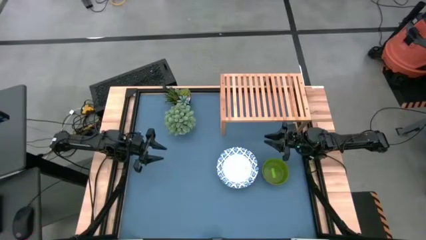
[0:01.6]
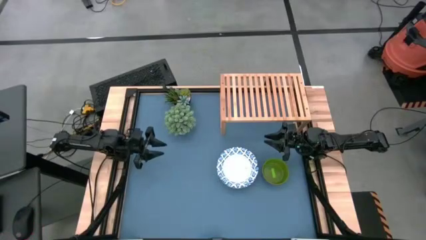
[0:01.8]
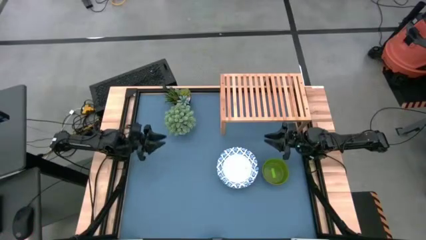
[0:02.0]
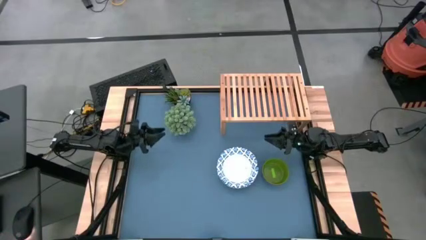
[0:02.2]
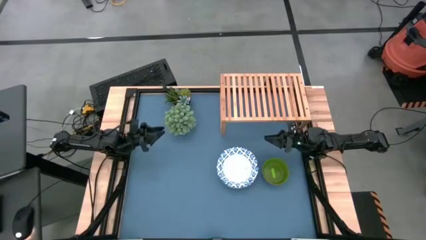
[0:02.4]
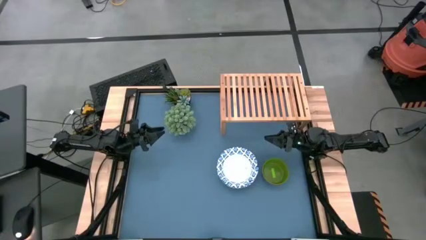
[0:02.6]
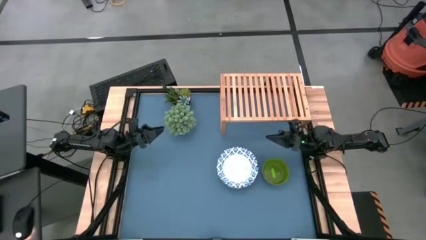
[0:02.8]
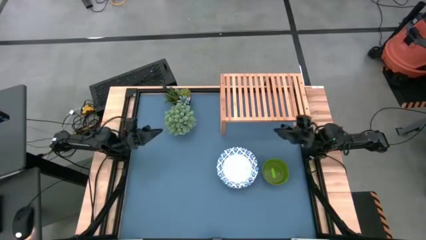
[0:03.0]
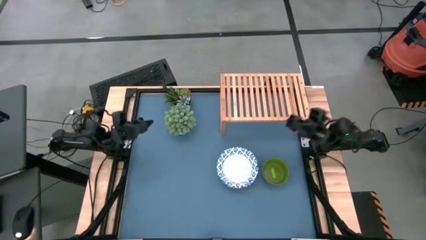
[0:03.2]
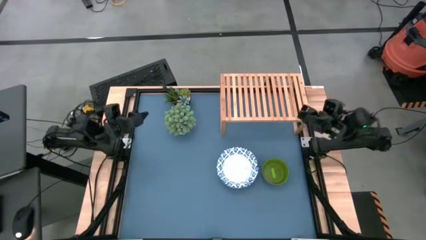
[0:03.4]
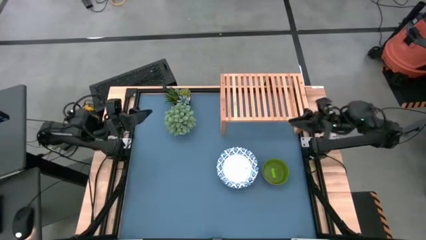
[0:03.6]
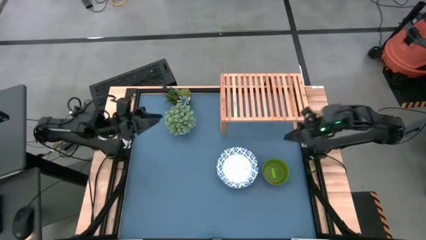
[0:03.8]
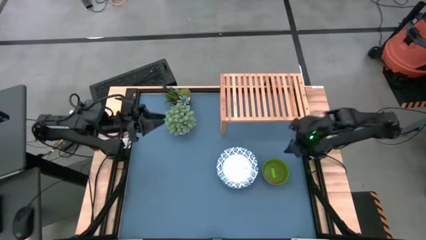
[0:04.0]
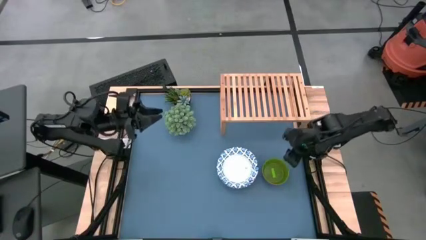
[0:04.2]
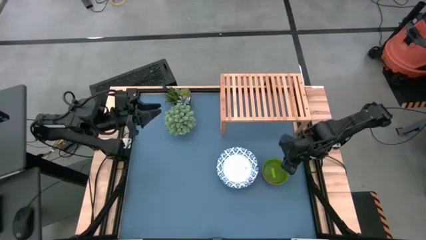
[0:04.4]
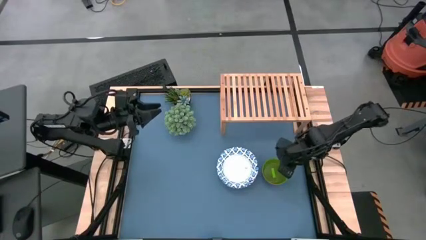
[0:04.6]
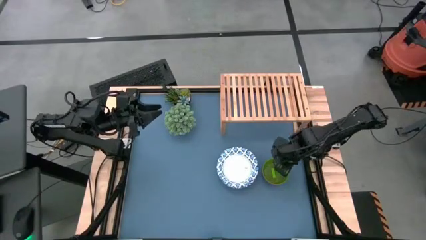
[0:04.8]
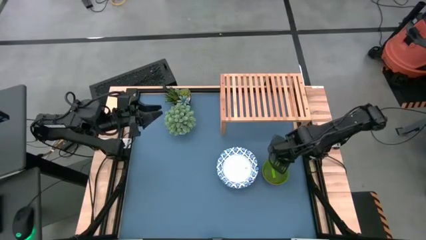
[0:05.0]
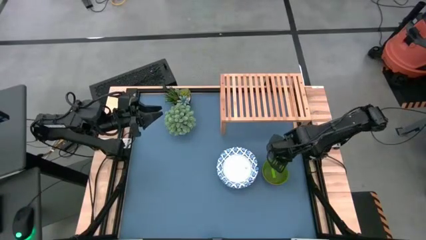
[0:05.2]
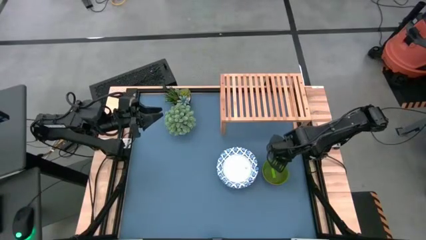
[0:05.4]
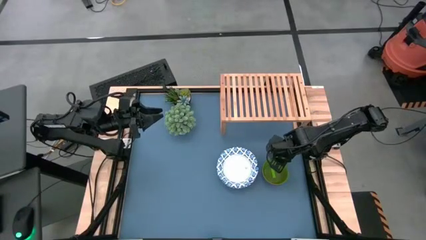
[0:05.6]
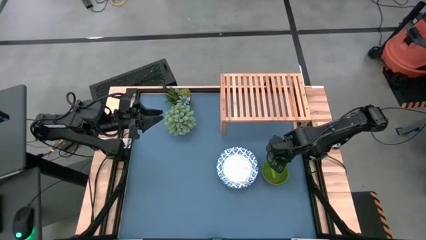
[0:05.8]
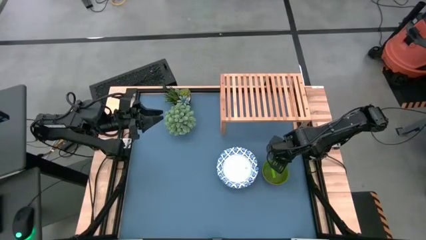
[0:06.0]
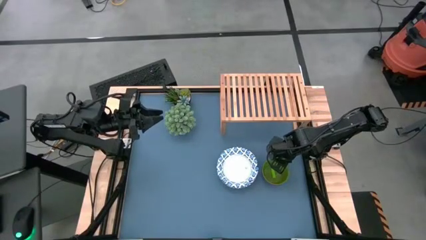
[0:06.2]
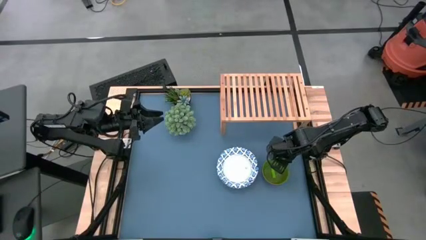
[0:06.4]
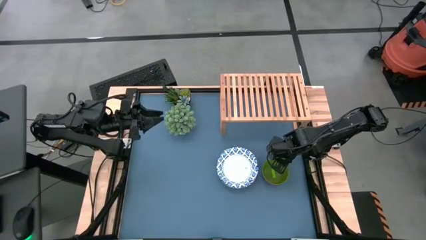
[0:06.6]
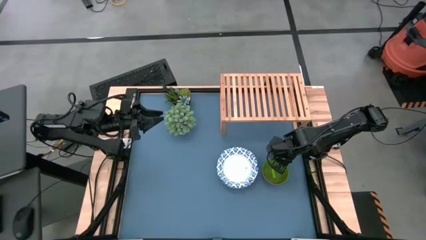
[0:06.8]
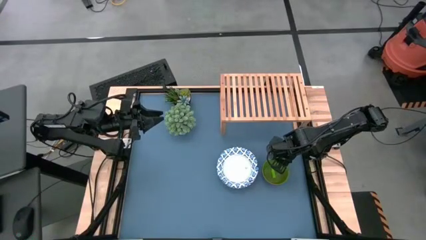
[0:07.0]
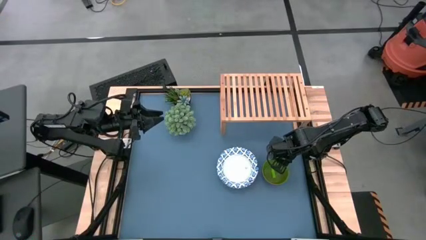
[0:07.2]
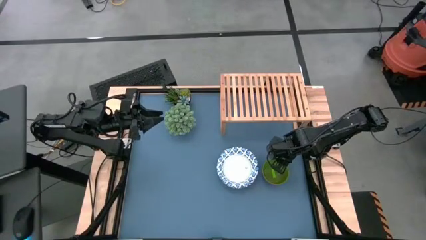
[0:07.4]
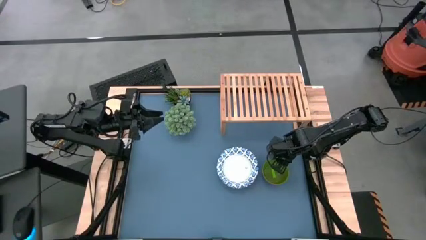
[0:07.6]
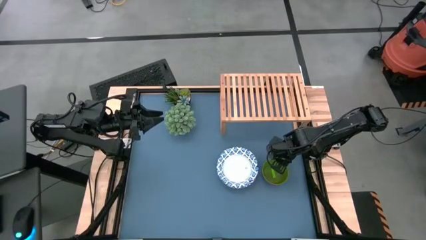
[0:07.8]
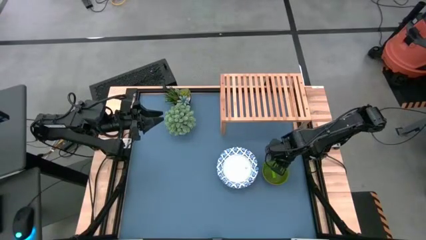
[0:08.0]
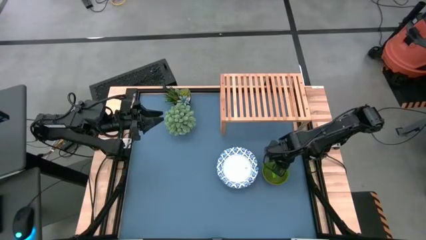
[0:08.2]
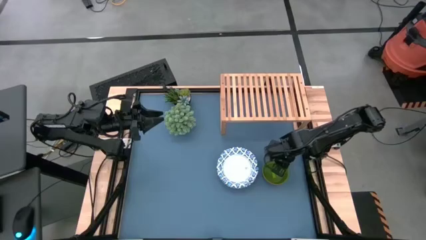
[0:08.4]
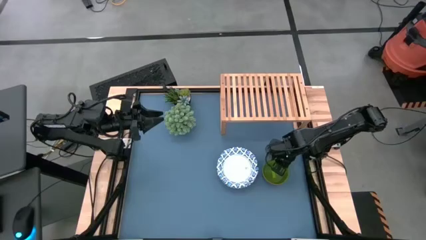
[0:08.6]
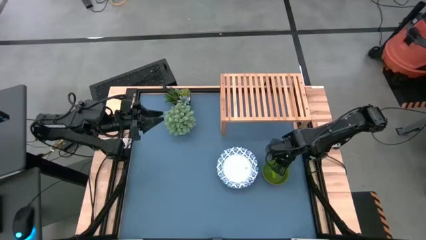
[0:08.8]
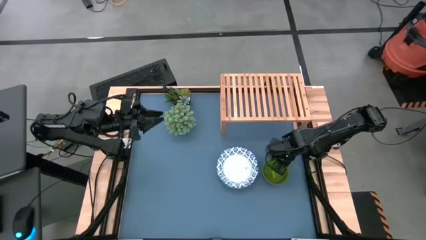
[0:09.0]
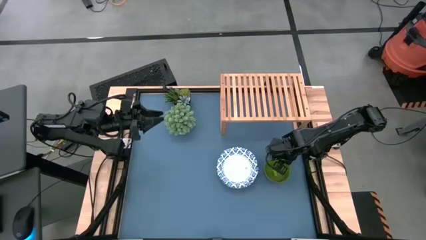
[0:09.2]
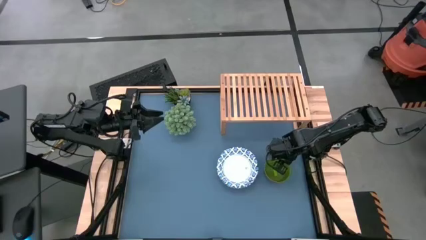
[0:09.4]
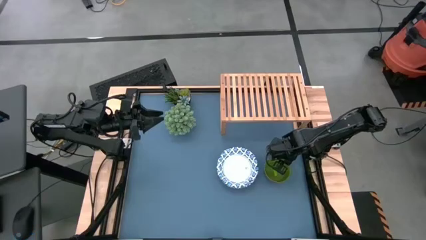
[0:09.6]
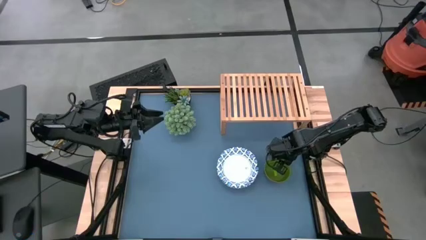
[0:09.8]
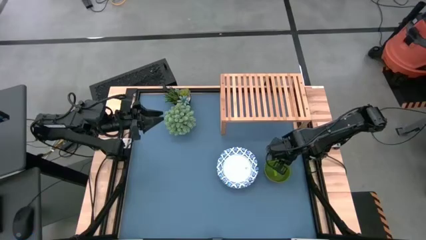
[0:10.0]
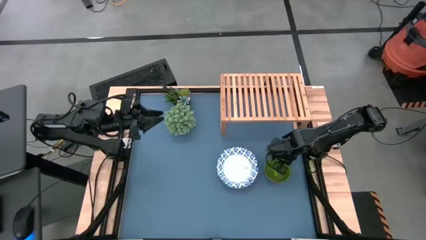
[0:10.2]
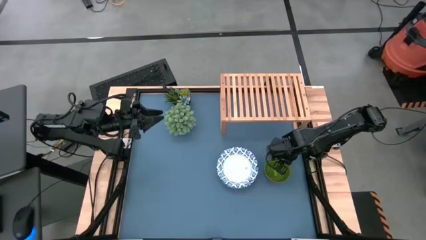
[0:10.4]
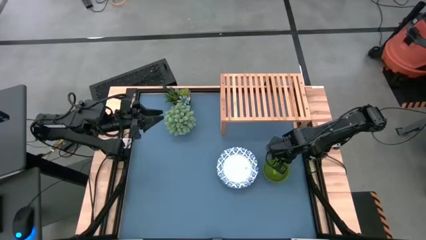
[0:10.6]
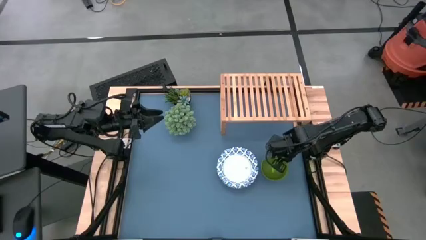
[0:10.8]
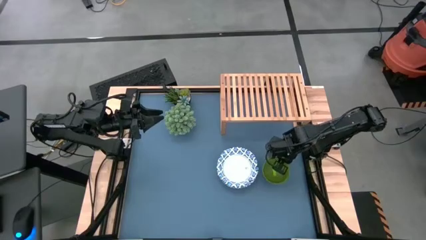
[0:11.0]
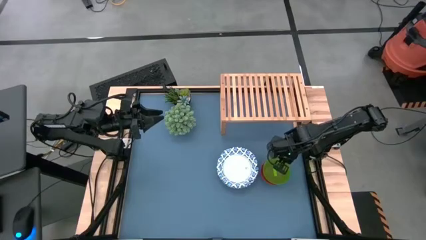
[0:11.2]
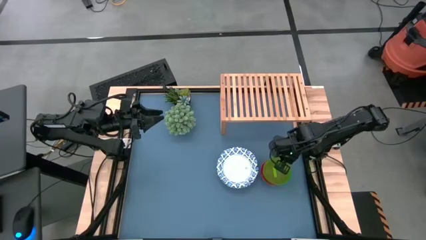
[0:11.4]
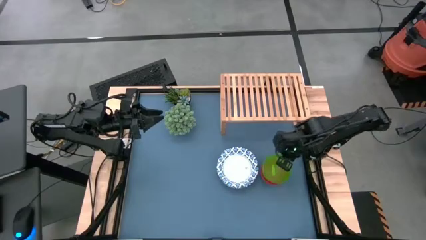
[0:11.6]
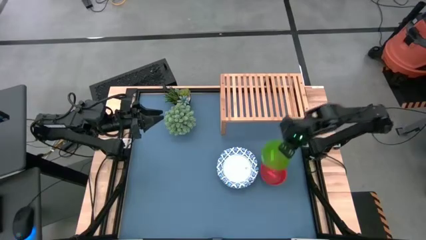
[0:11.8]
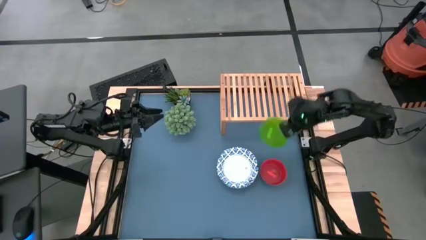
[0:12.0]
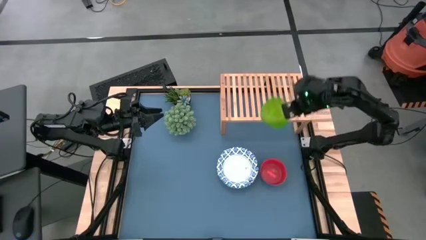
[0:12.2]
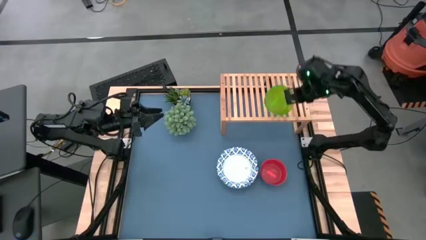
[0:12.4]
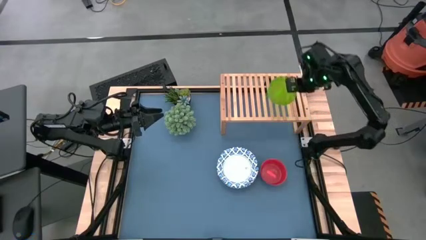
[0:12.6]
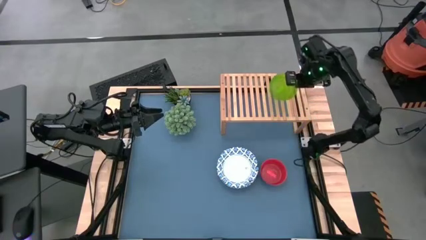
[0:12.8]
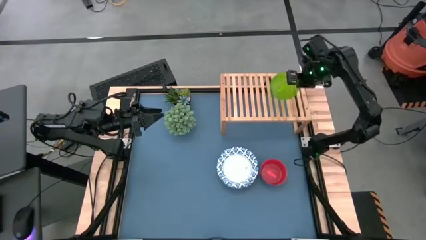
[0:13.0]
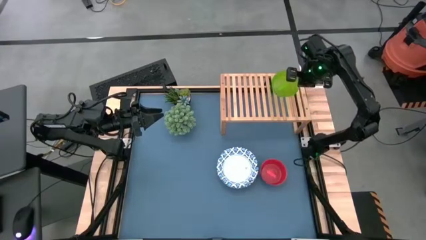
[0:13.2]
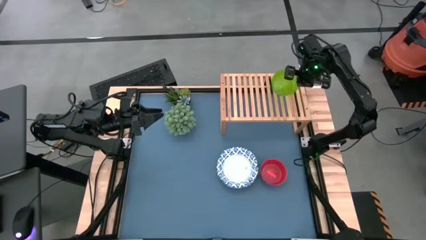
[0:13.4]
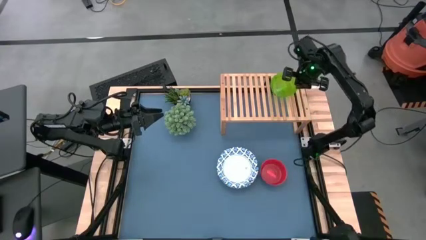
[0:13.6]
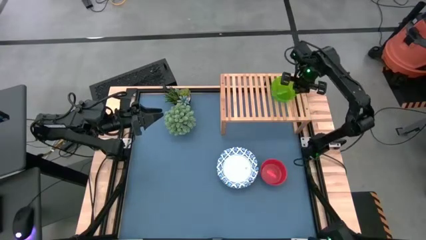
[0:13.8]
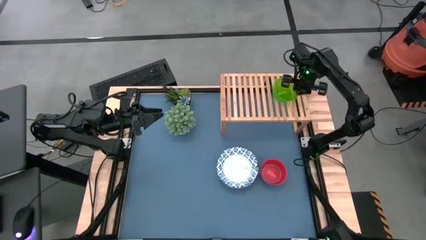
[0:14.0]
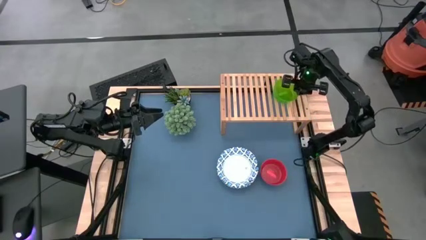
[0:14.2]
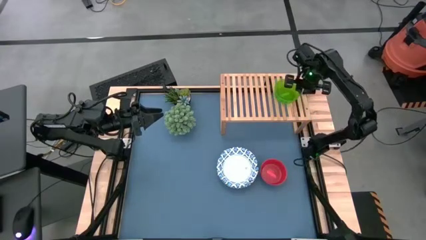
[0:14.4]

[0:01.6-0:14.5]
Task: Place and stack bowls onto a shelf
Put the green bowl on the shelf

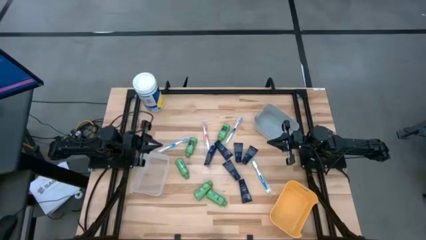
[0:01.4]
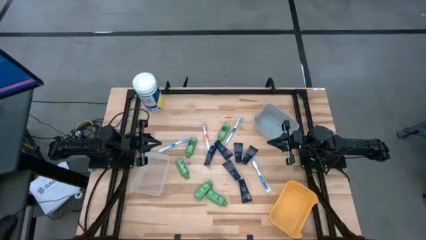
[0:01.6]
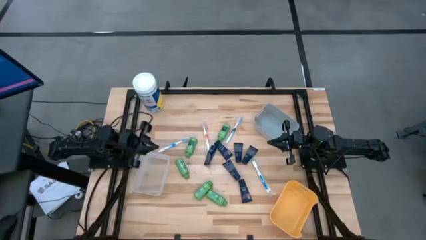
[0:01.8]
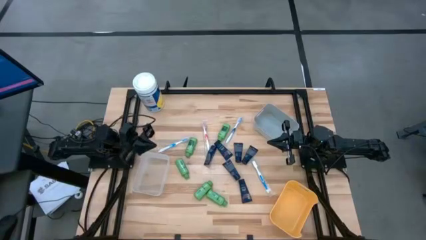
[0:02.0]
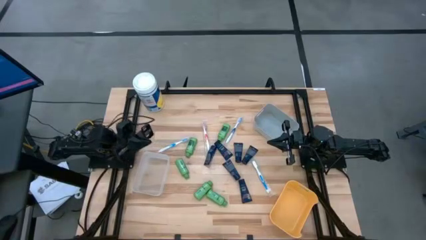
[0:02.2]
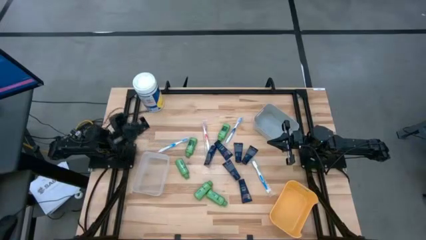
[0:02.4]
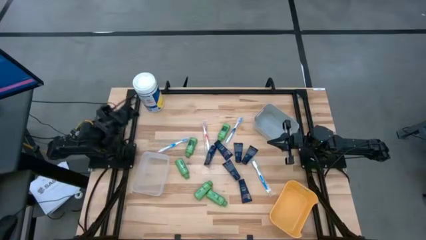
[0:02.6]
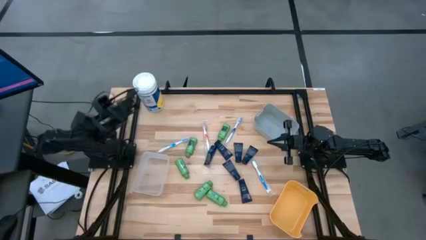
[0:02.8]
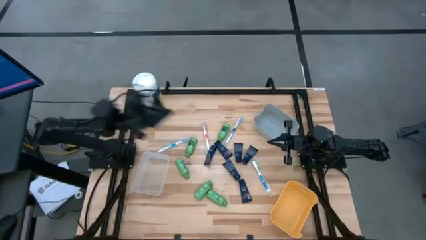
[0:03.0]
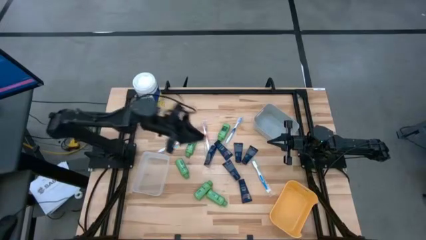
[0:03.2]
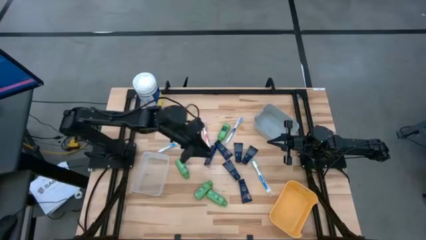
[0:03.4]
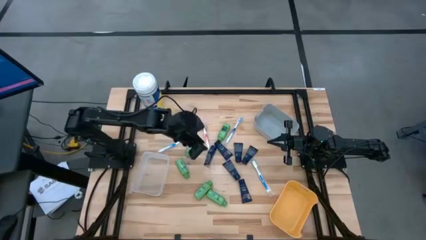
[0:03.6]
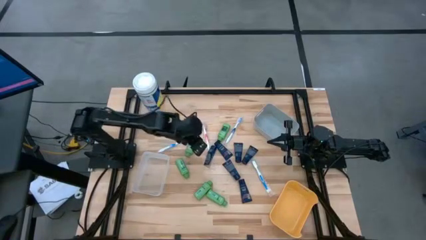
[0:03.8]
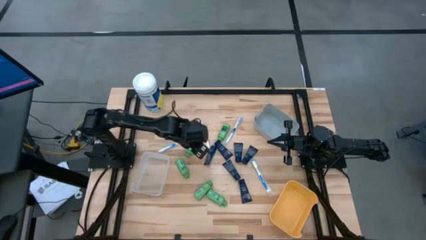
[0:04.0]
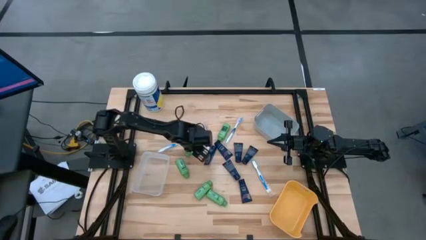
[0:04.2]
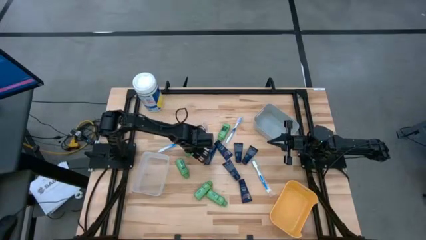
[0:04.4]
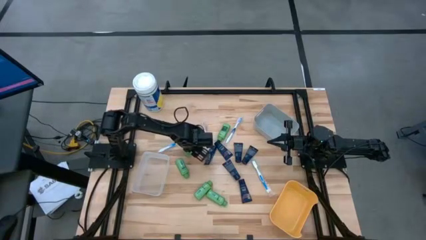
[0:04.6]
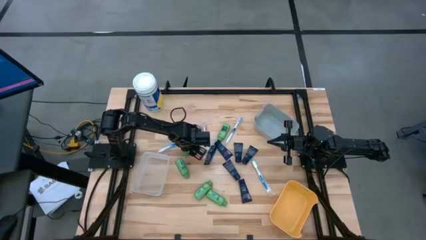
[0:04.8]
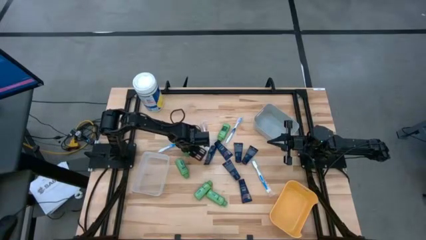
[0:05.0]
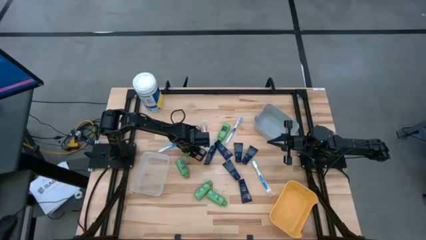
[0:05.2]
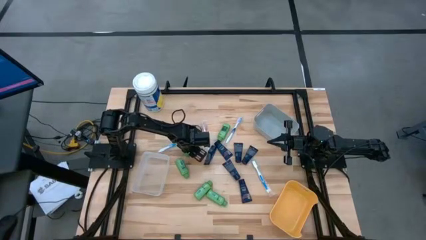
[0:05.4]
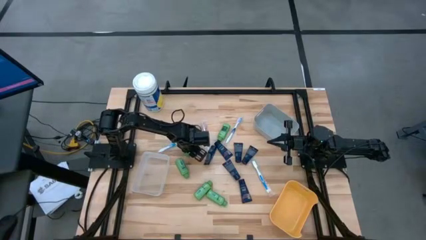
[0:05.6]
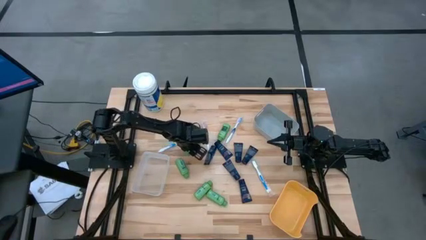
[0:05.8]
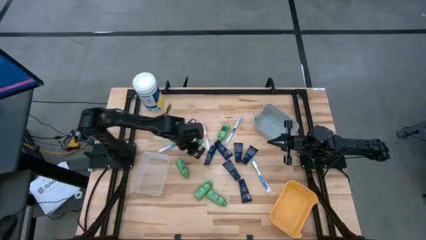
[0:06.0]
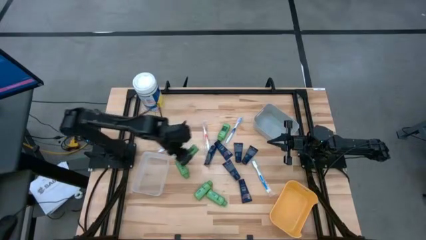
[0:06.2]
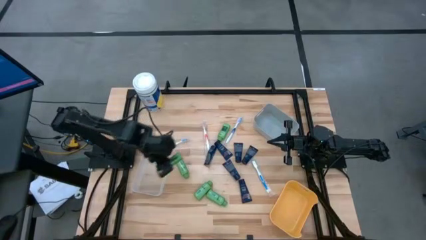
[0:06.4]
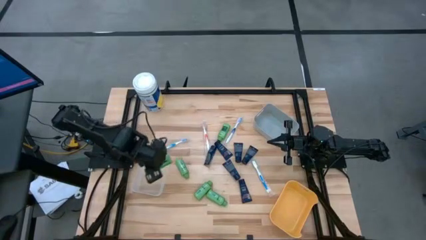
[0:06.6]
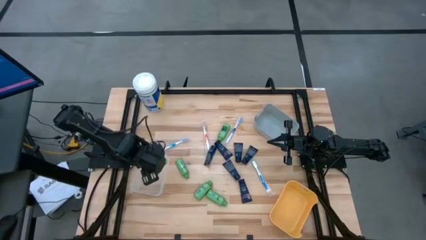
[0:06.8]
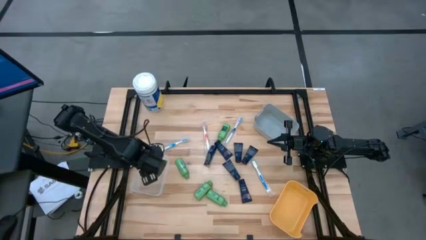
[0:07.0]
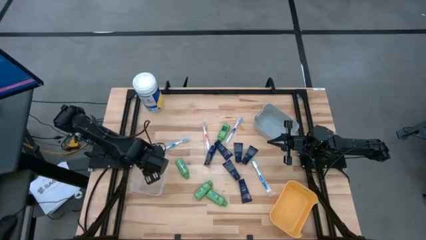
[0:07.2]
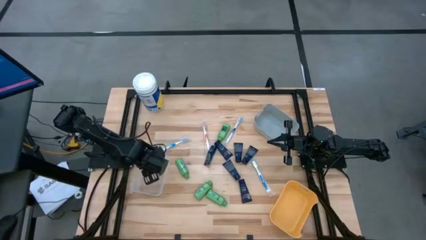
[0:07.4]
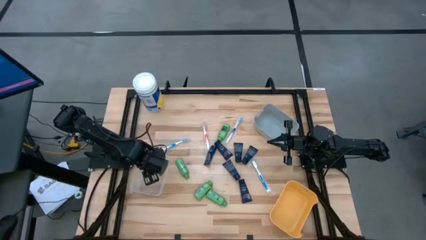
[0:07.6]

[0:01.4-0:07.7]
Task: Pick & Place Travel size toiletries
Put the green shampoo bottle into the transparent bin
